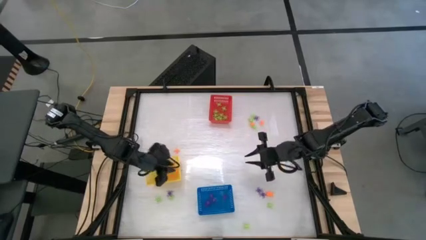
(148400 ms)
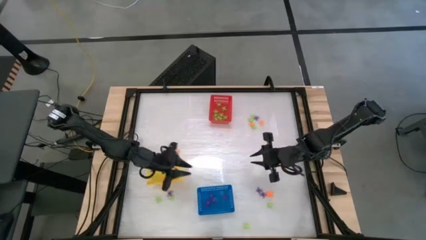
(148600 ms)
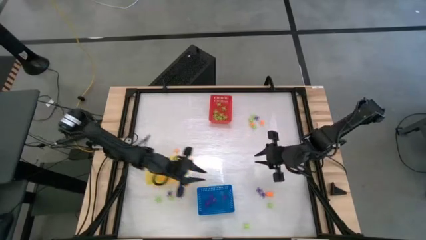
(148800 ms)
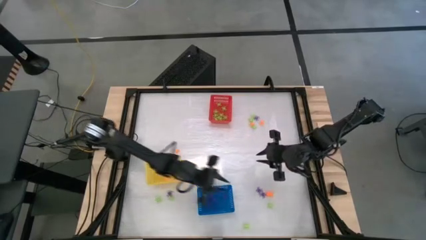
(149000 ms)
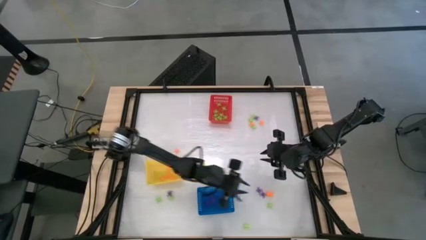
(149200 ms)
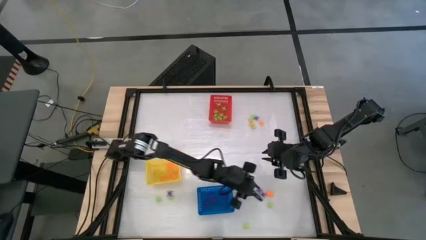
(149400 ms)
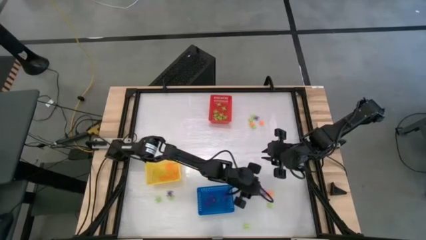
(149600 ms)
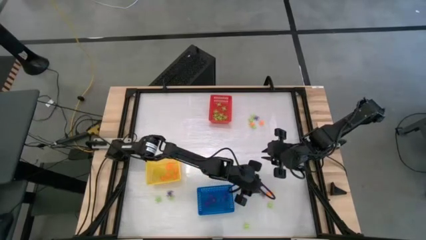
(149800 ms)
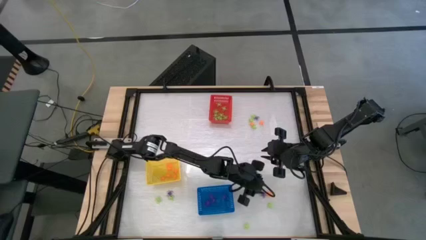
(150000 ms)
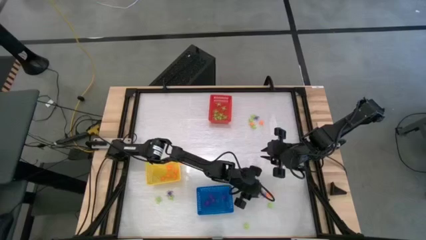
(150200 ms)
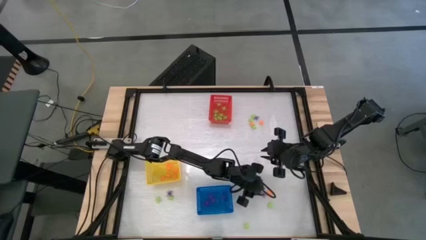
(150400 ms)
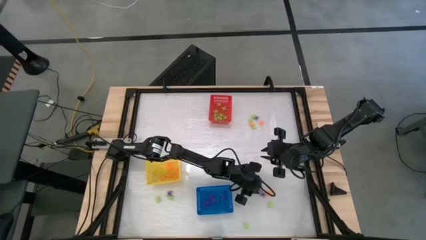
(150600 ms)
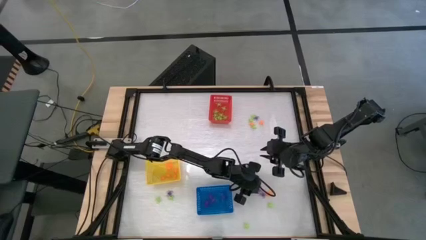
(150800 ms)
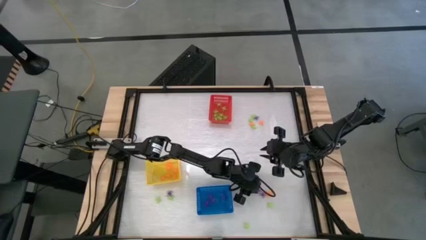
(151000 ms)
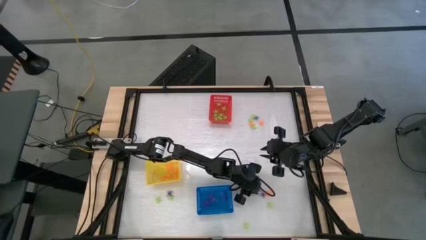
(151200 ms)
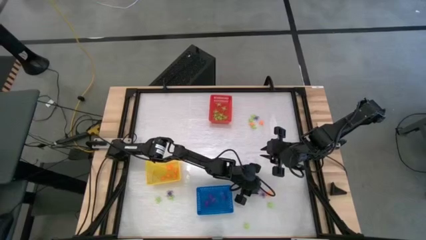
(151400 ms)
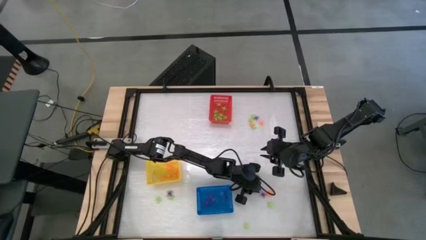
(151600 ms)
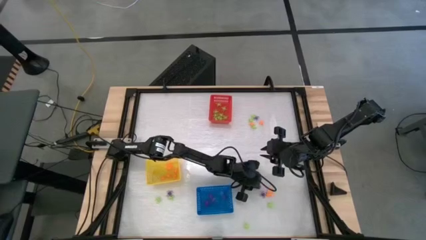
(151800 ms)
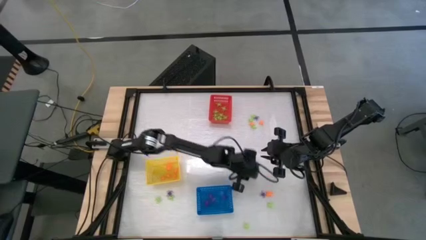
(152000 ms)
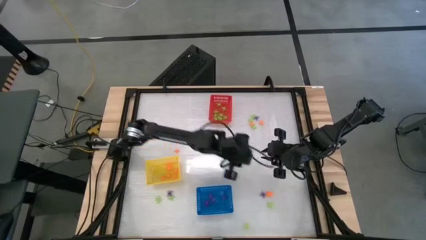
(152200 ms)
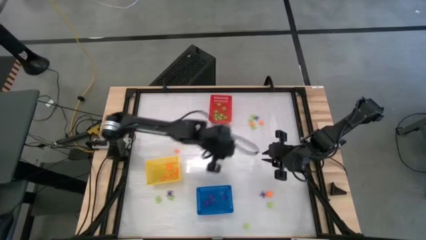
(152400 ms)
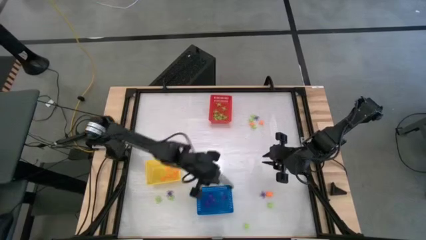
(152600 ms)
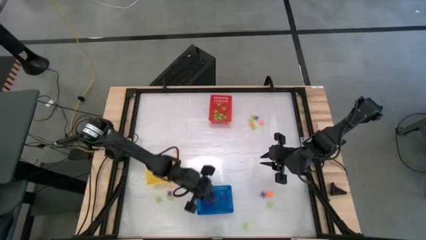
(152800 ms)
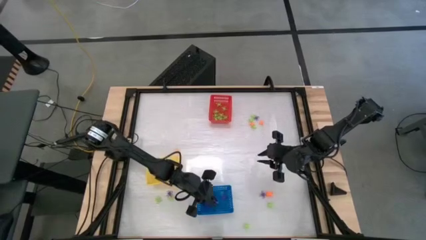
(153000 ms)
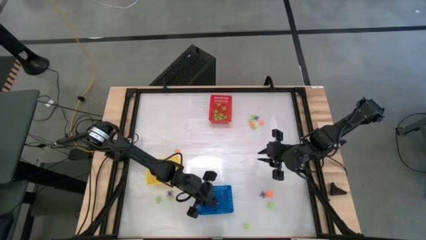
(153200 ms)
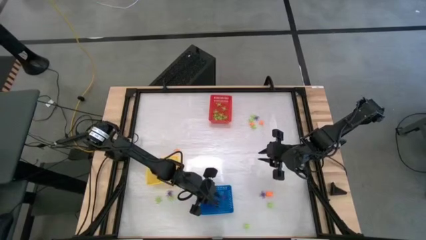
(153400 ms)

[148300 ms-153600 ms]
Task: Sort Halloween decoration
Put the purple spider toy into the blue basket

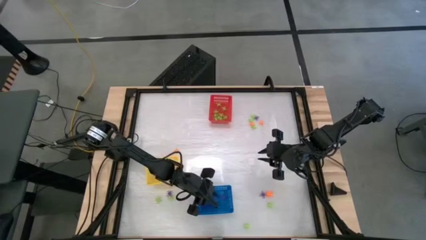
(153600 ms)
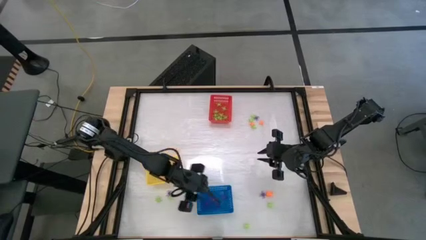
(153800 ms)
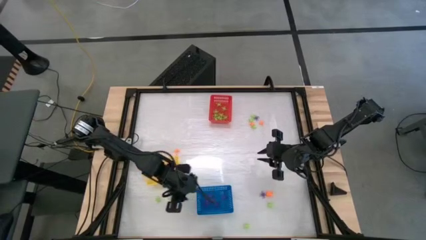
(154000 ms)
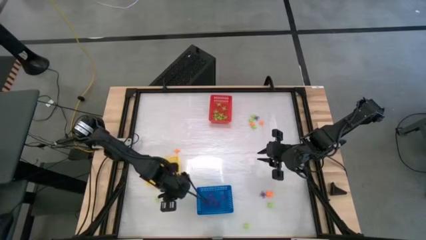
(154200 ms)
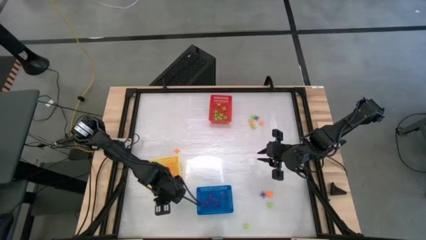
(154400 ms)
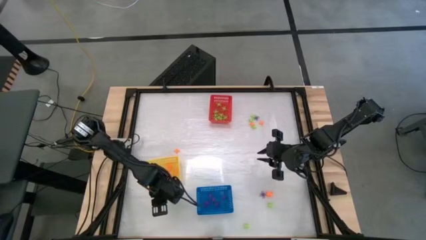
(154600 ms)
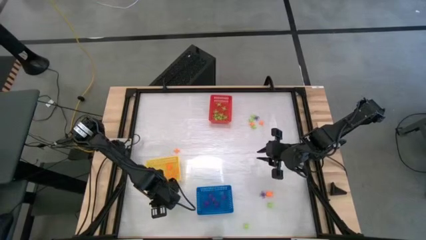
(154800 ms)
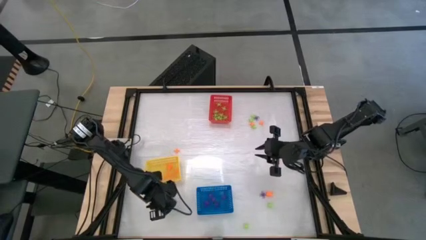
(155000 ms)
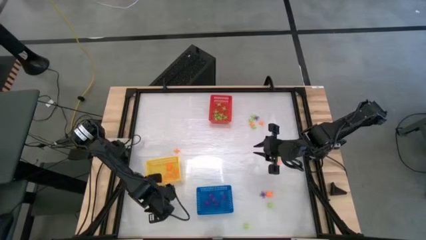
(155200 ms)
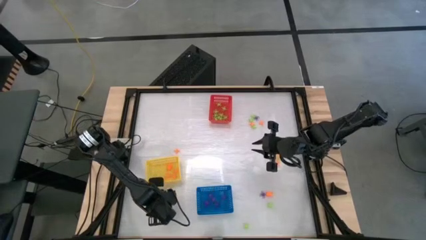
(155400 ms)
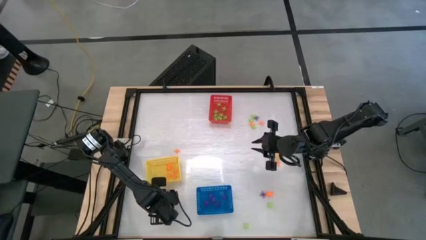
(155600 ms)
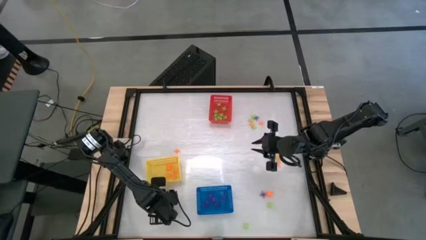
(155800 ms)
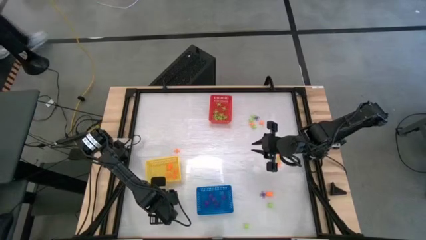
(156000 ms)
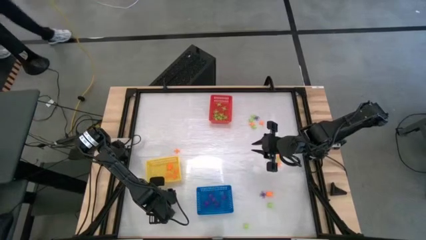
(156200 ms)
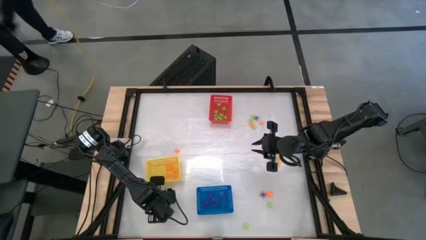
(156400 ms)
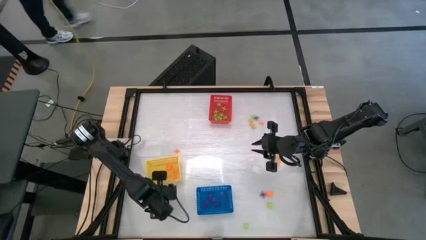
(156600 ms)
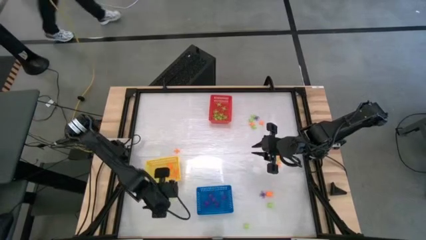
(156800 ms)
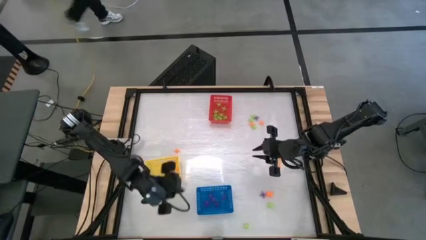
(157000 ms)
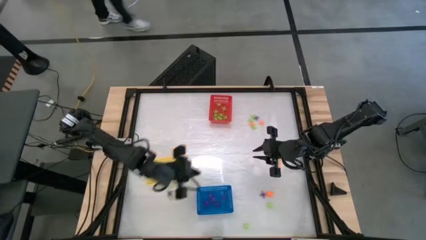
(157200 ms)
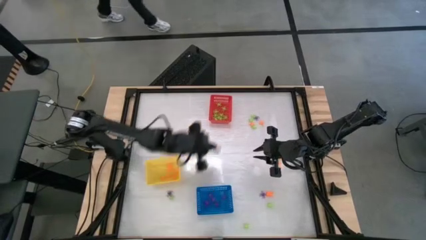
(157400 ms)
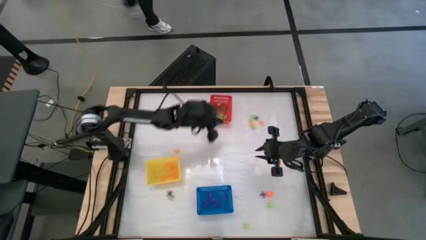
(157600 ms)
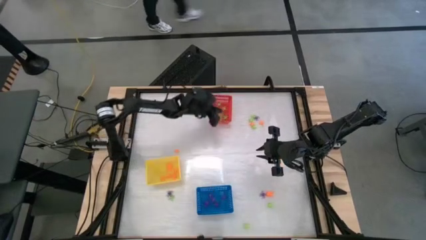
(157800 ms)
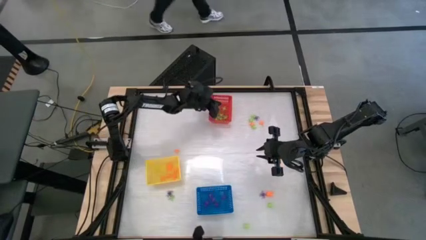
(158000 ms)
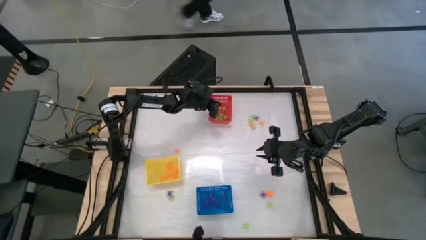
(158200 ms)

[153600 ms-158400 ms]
Put the green spider toy into the red basket

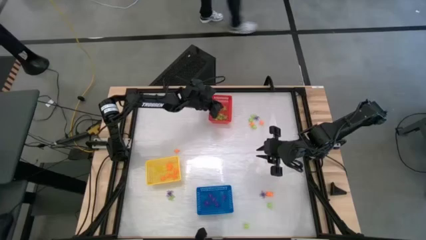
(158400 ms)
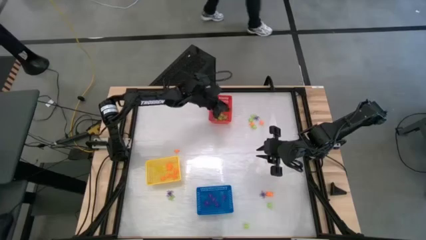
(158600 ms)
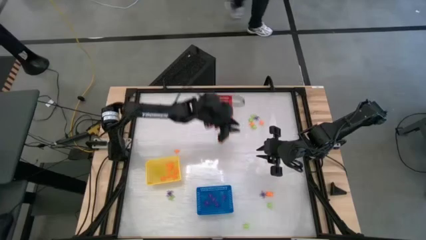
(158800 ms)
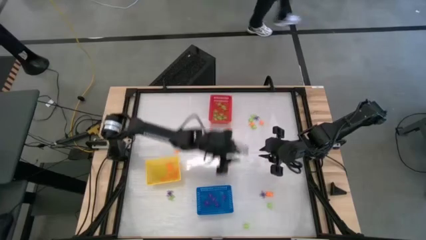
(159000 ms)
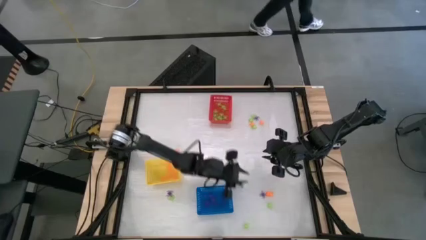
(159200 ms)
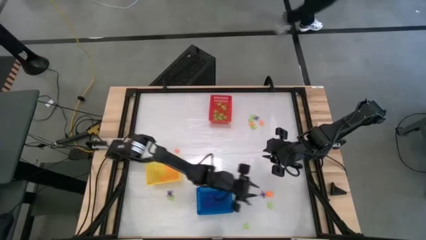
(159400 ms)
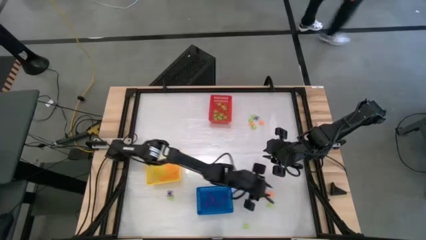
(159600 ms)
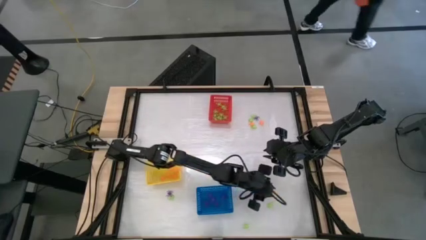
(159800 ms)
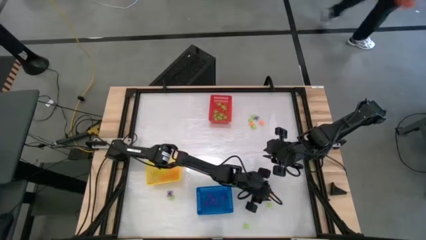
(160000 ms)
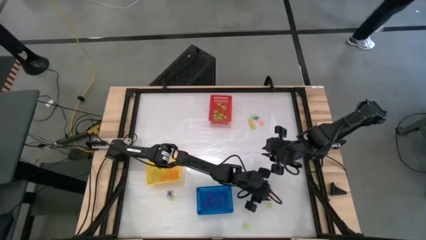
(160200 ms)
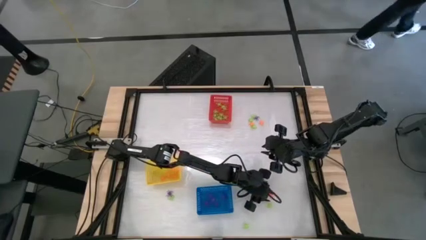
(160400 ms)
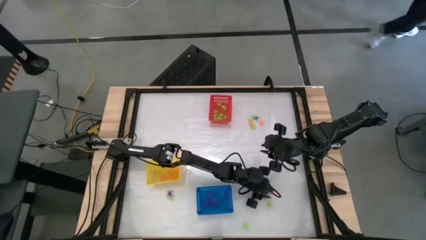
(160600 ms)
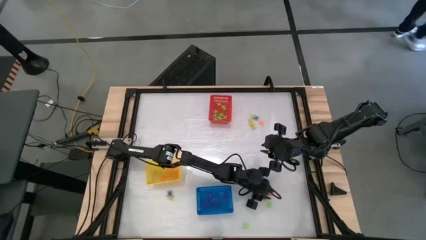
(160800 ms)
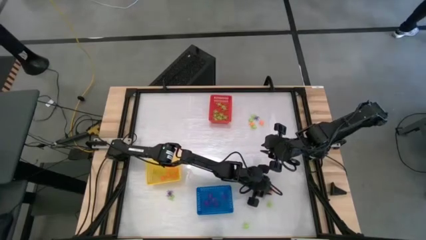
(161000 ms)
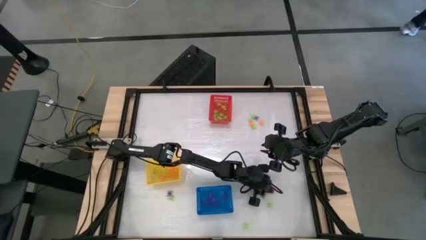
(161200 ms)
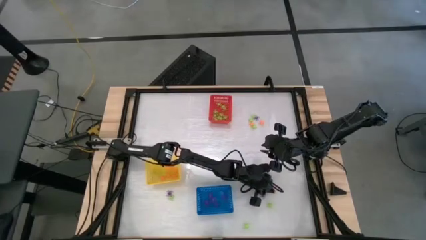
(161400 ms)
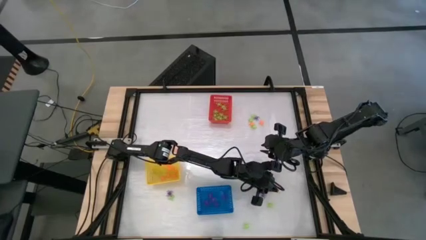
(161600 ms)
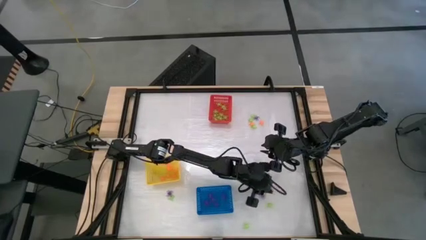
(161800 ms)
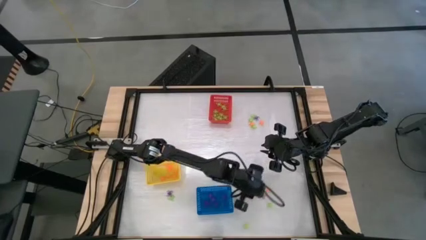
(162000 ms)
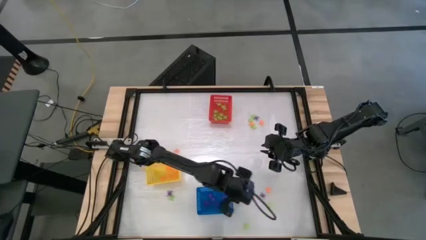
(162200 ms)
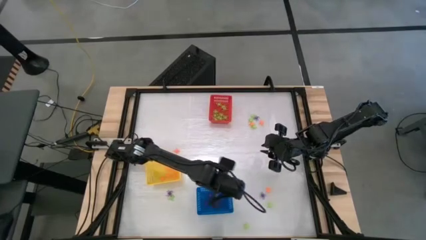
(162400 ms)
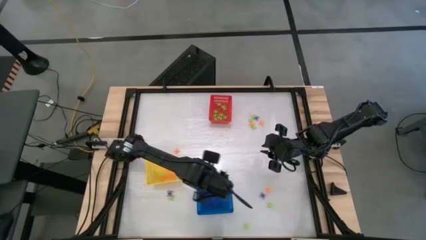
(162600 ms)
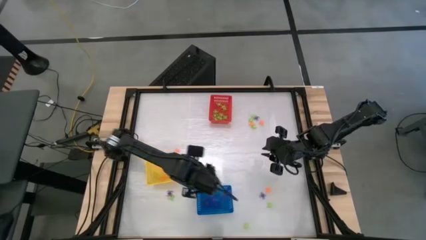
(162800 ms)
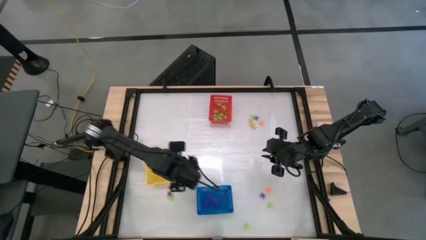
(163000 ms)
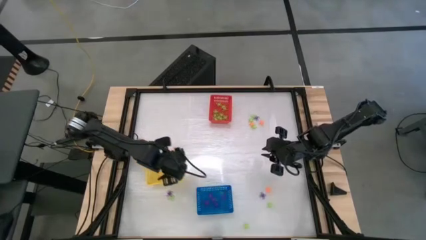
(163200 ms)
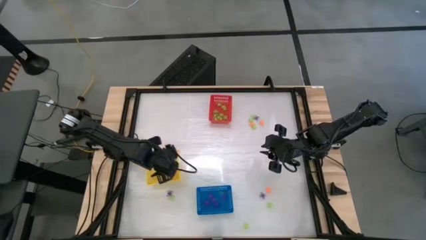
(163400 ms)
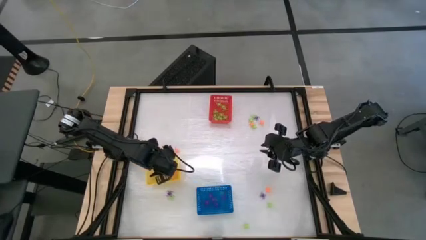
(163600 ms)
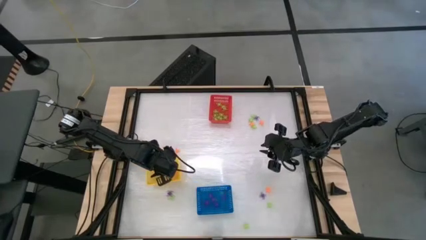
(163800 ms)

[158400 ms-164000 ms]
Put the orange spider toy into the yellow basket
